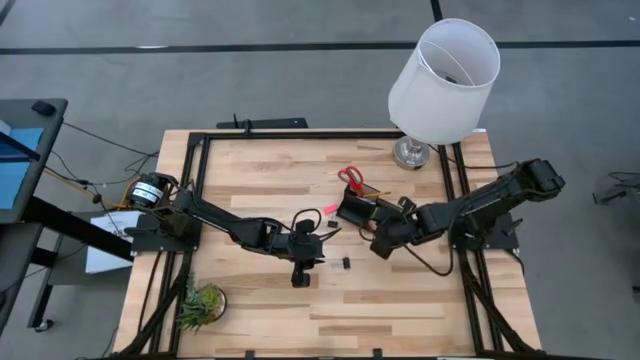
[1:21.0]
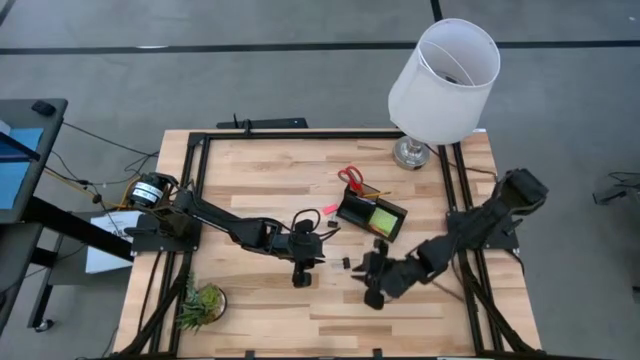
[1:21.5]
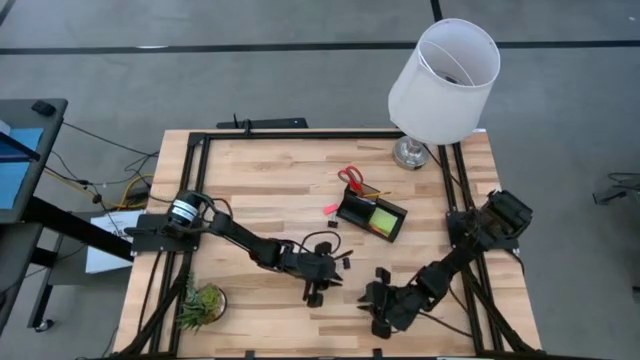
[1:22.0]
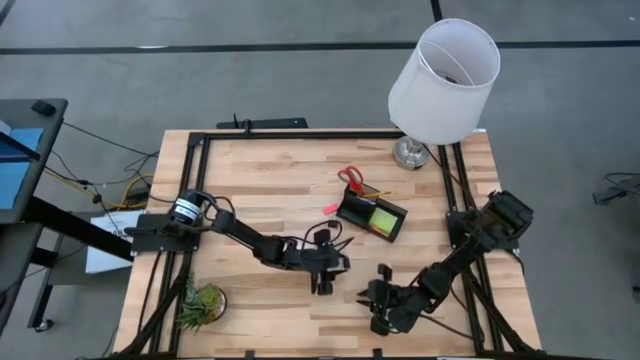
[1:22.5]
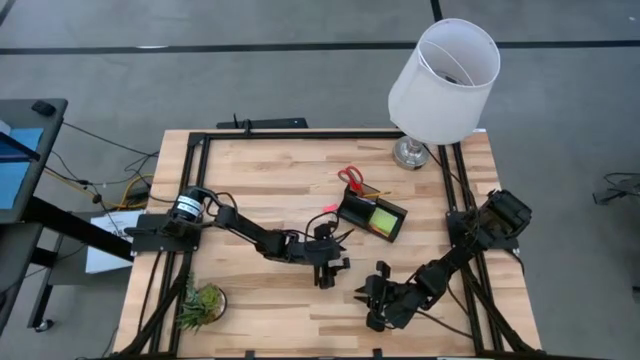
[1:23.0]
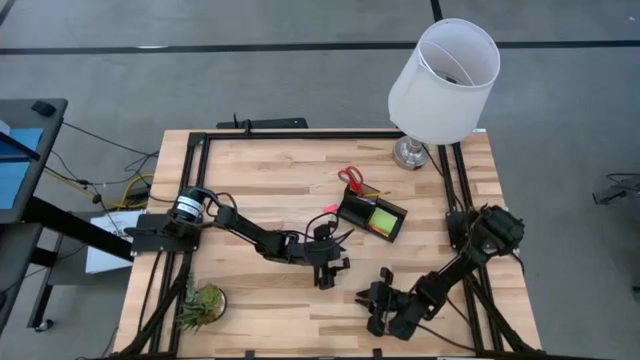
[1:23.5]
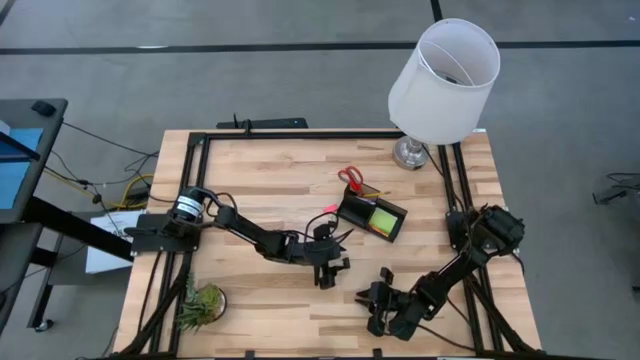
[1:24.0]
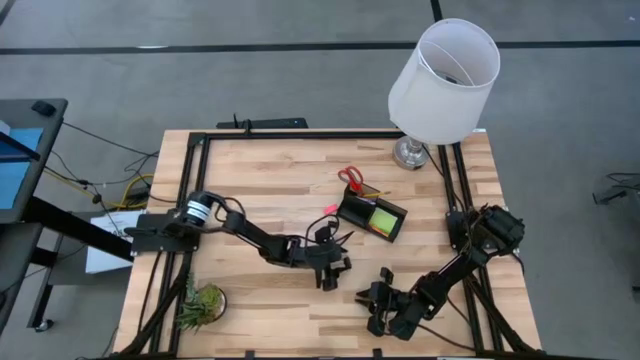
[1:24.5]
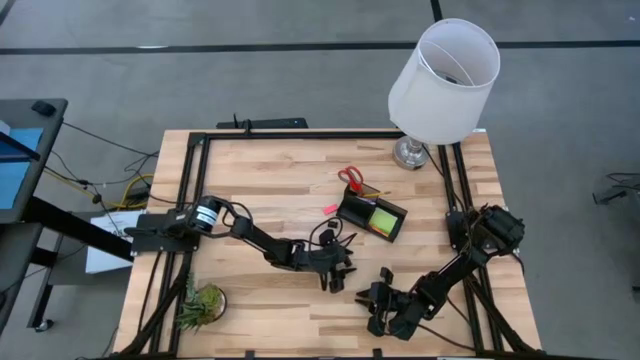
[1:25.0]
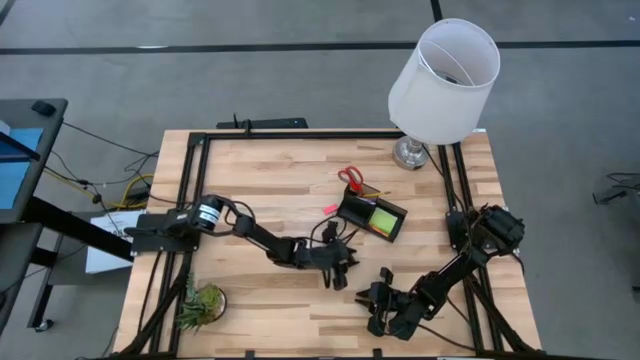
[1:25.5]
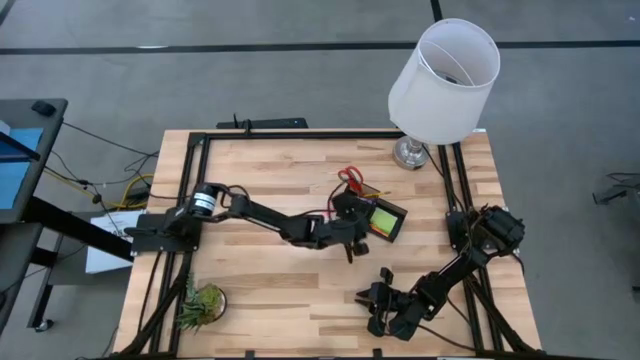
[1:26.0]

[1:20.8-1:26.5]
Task: Pick and place office supplies into organizer
Put the bottom binder clip into the desk organizer

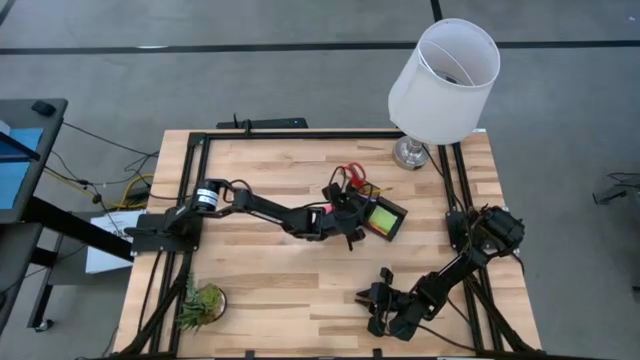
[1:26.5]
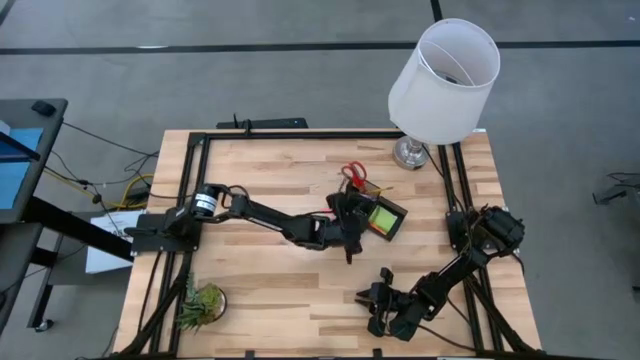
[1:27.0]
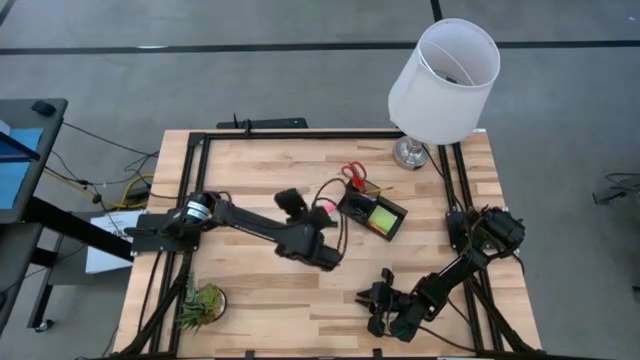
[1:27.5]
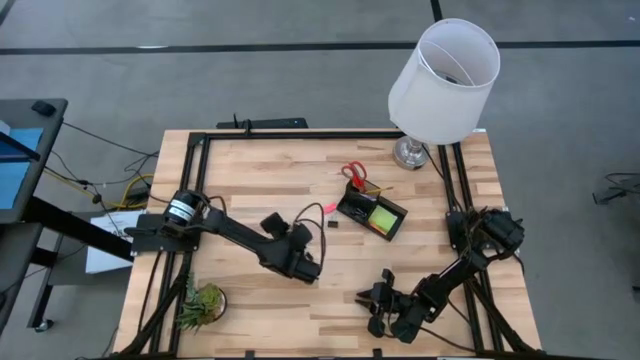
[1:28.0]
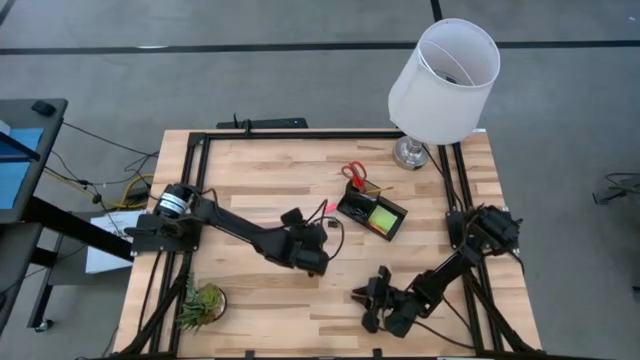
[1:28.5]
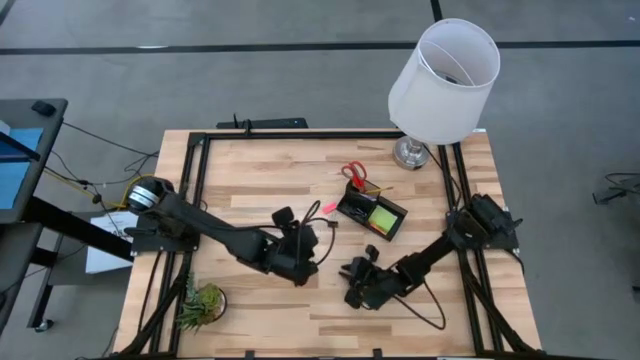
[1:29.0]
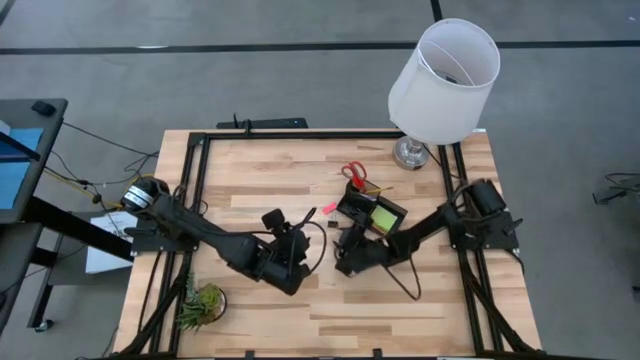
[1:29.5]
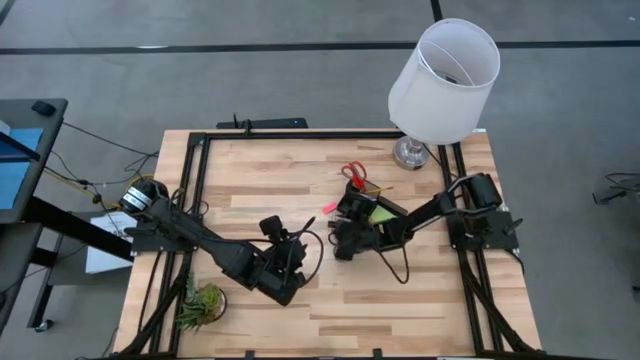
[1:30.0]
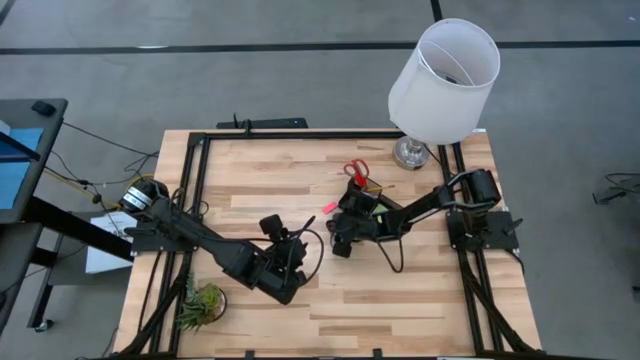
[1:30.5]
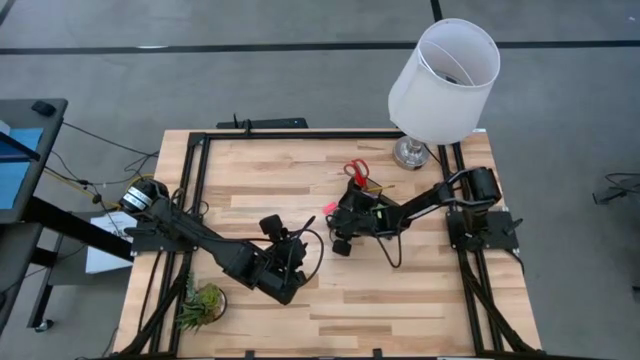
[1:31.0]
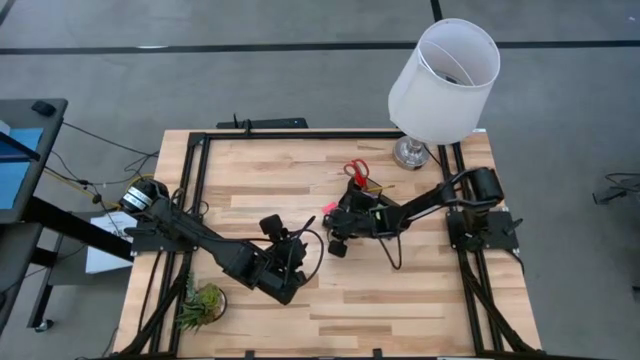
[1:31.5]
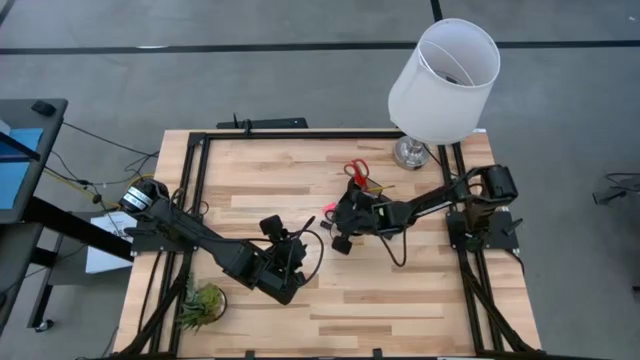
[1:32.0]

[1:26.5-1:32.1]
Put the binder clip into the desk organizer

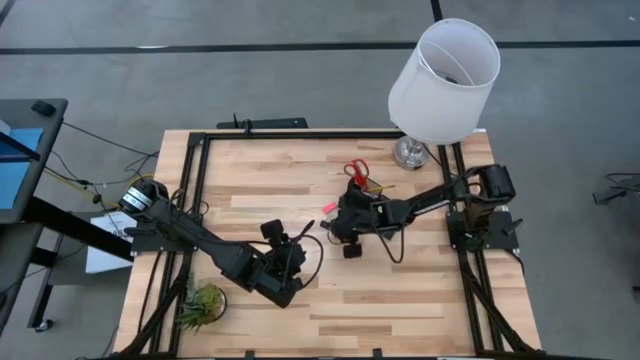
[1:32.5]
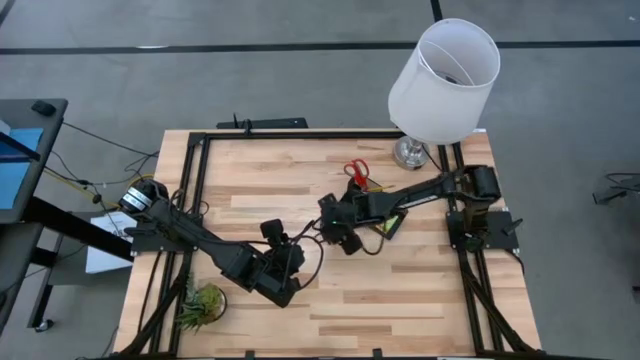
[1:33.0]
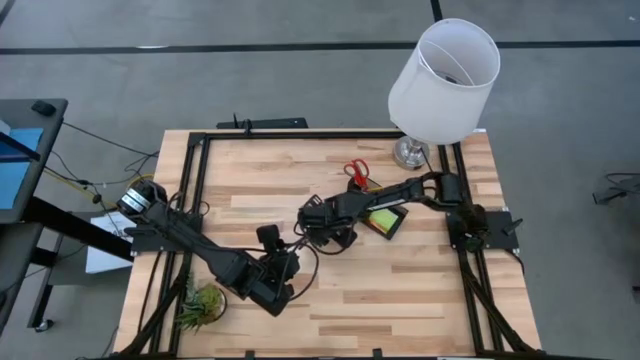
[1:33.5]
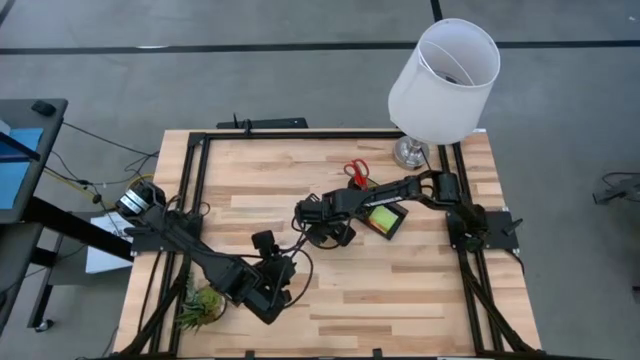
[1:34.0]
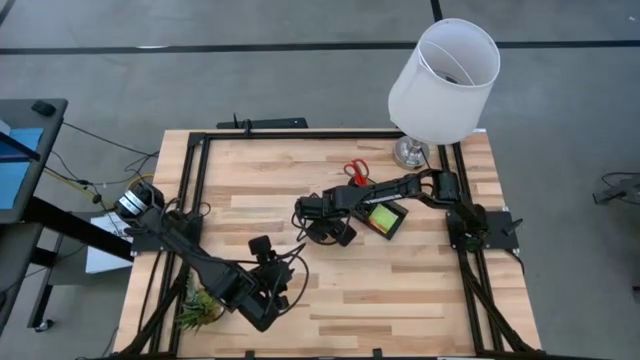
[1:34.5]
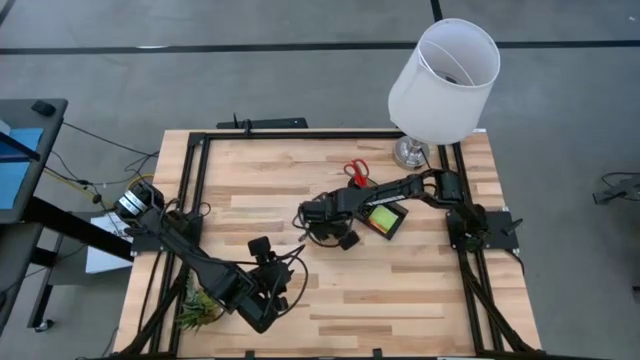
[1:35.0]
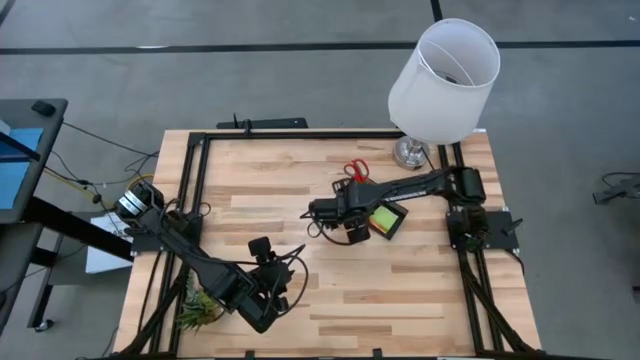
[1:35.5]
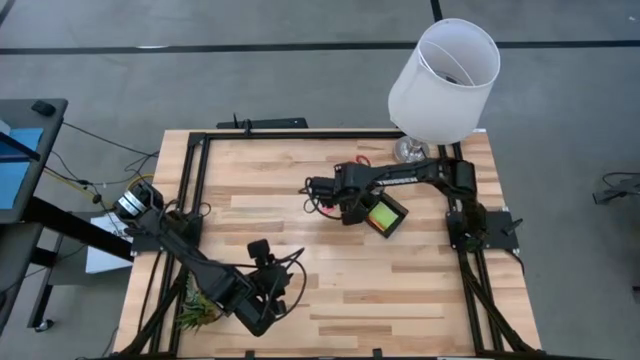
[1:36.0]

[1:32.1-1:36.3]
Put the binder clip into the desk organizer

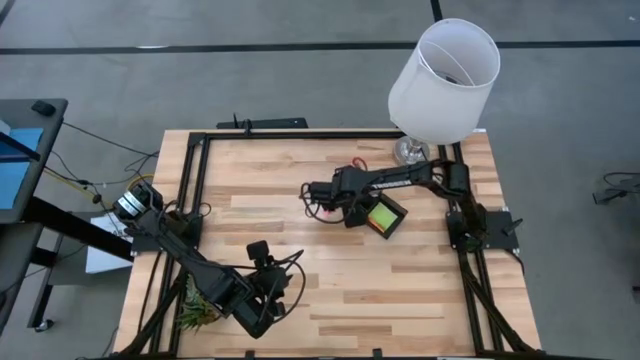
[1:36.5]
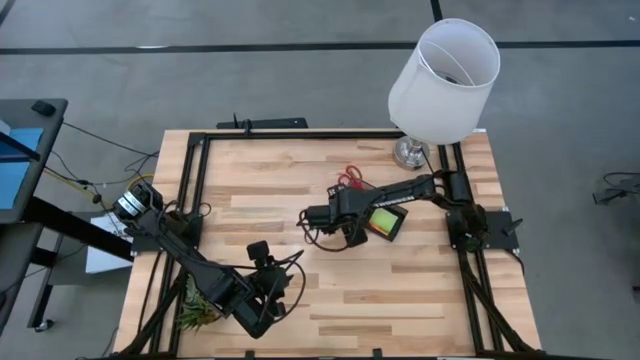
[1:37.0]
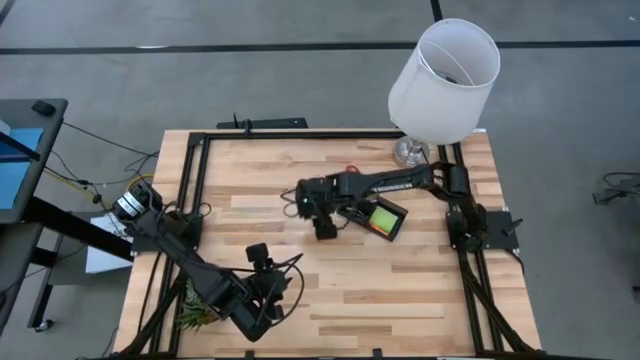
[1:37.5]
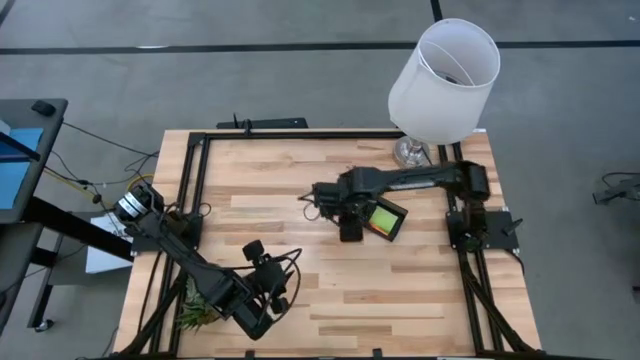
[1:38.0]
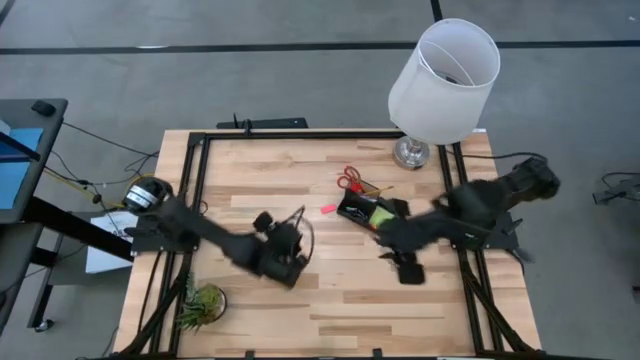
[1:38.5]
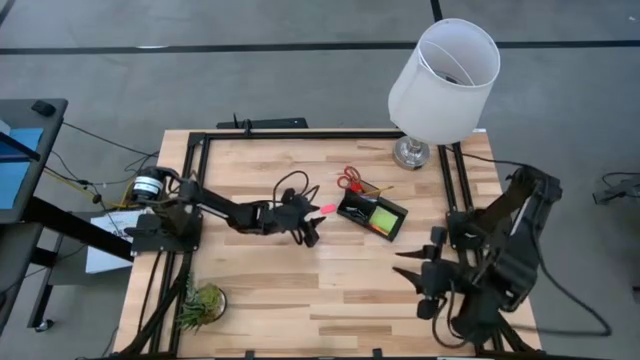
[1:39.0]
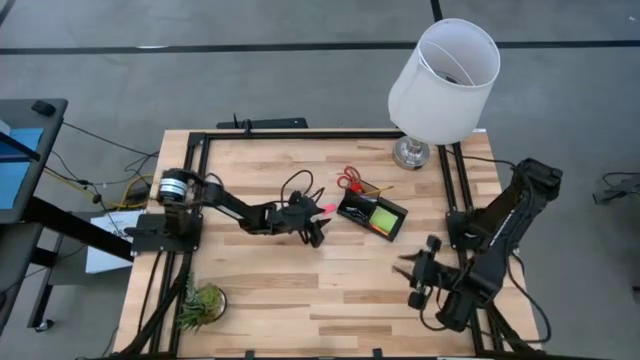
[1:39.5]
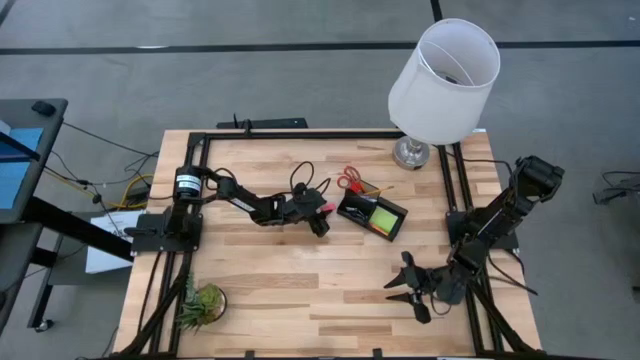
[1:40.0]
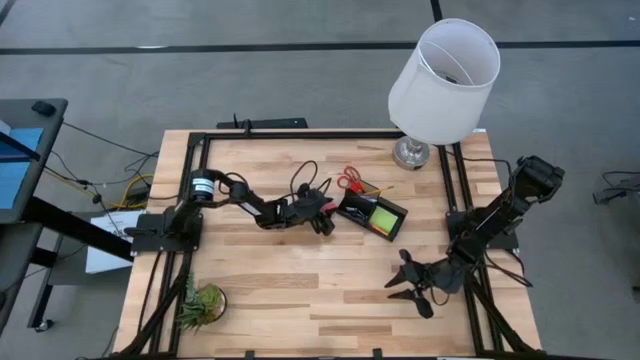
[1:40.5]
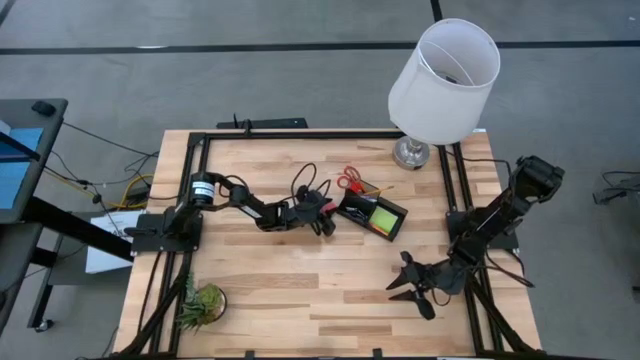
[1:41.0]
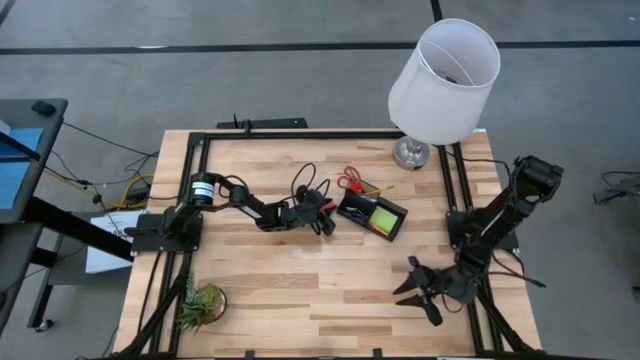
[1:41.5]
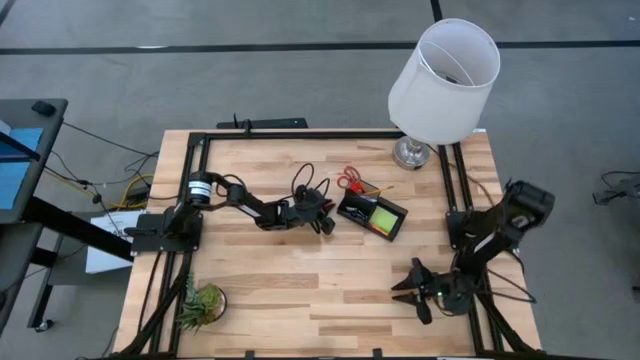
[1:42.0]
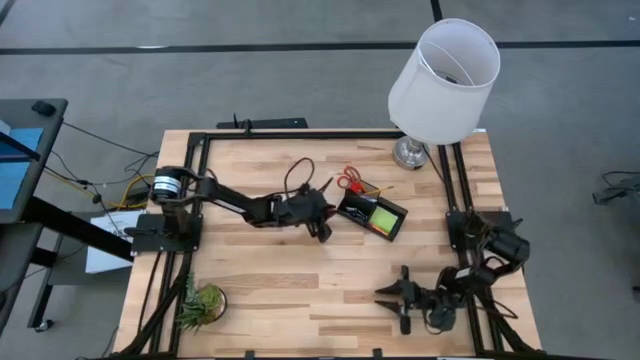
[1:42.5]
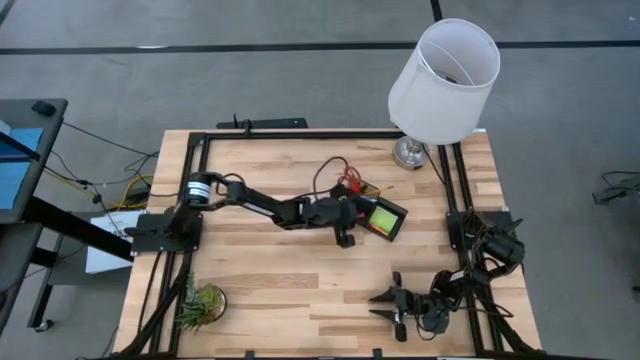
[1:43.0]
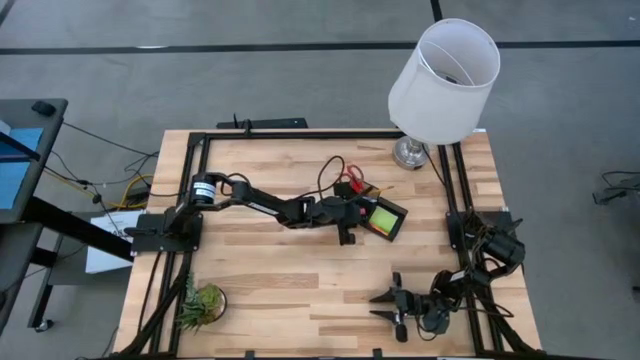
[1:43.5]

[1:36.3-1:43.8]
Put the eraser into the desk organizer
